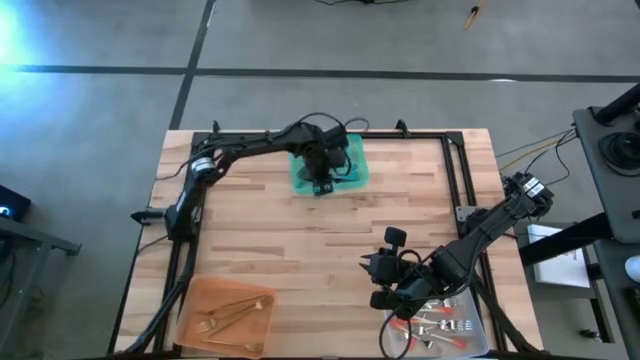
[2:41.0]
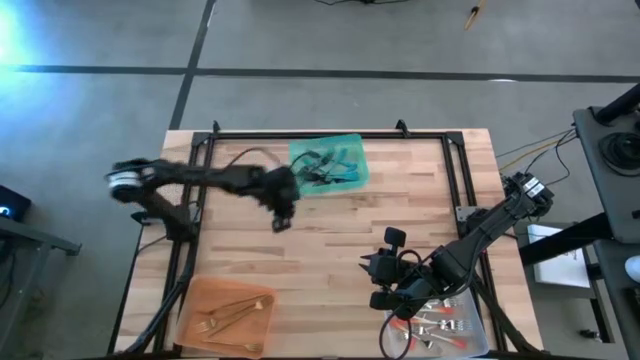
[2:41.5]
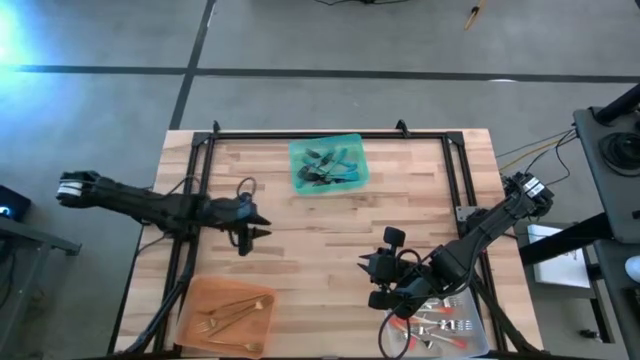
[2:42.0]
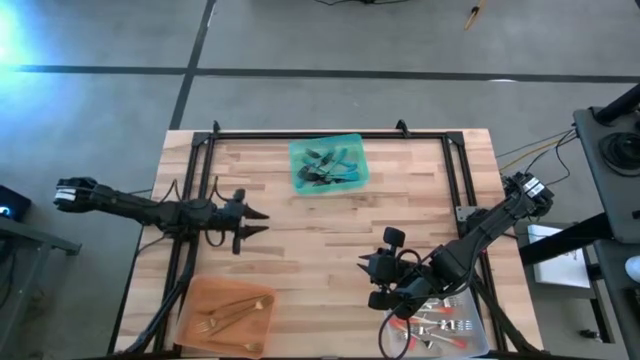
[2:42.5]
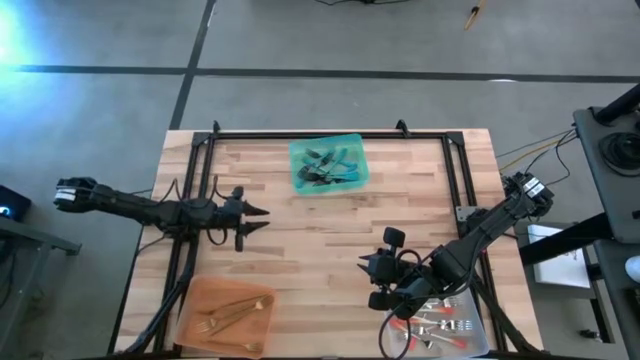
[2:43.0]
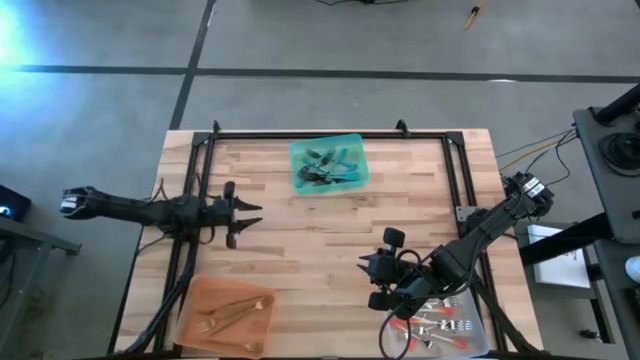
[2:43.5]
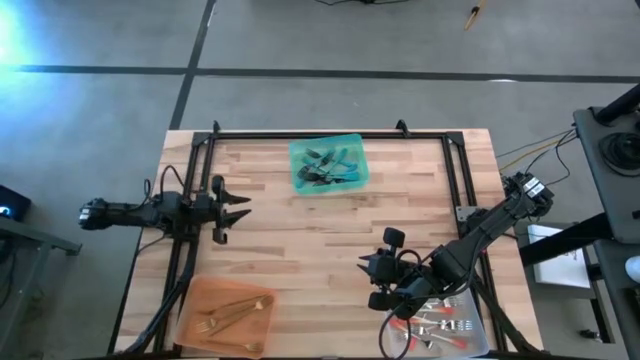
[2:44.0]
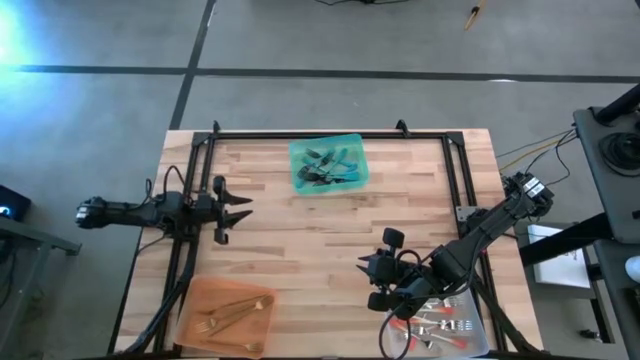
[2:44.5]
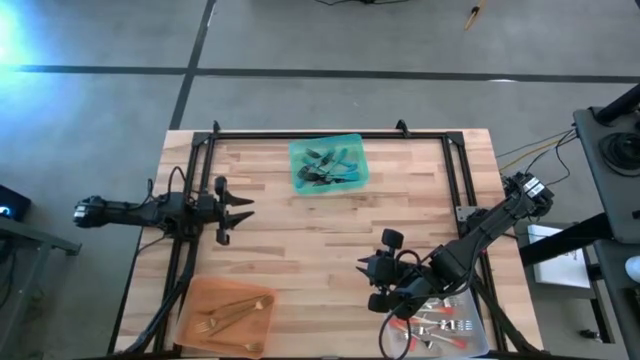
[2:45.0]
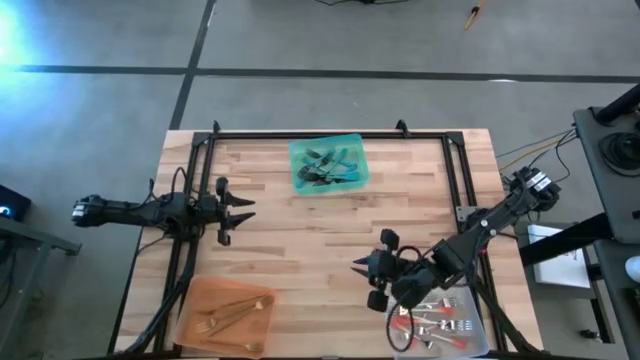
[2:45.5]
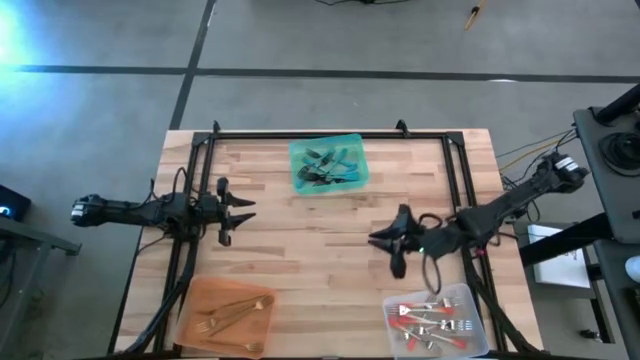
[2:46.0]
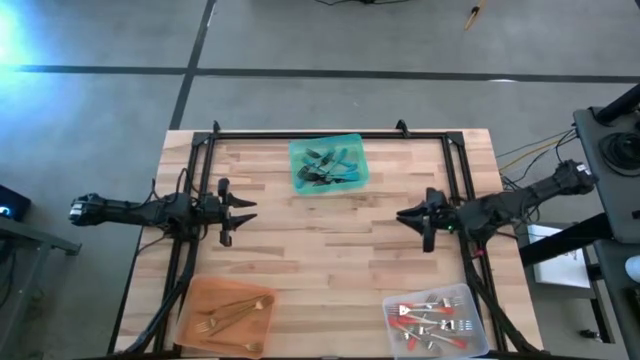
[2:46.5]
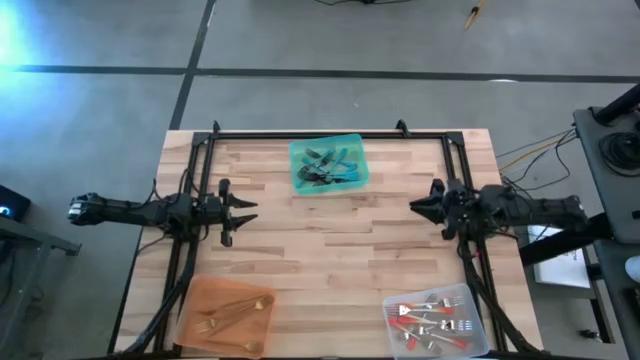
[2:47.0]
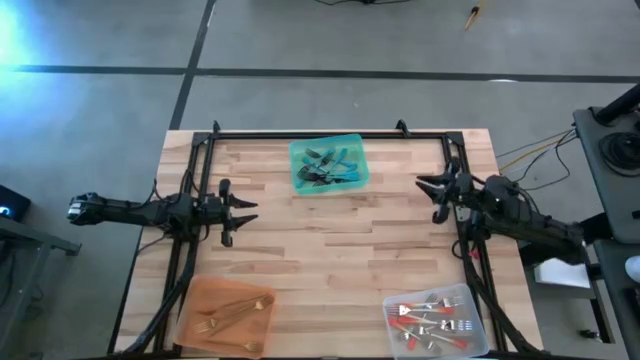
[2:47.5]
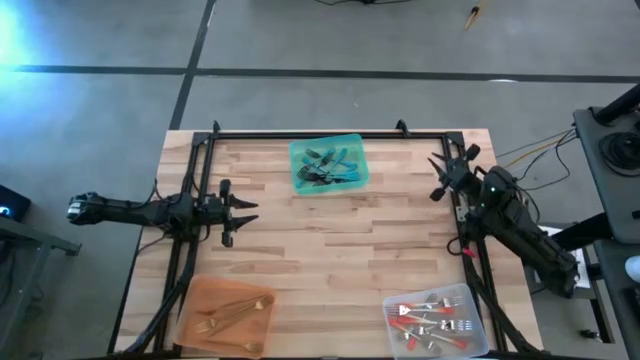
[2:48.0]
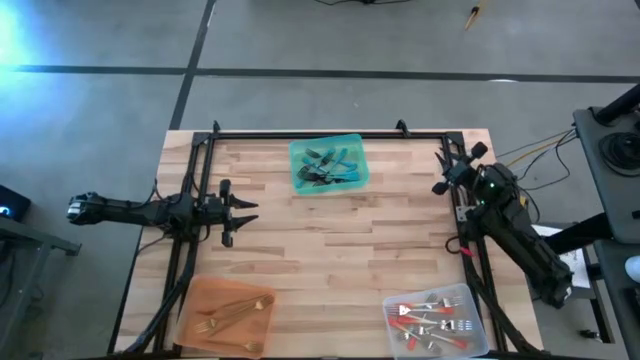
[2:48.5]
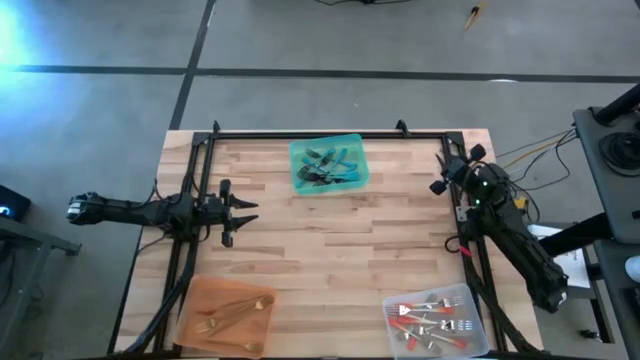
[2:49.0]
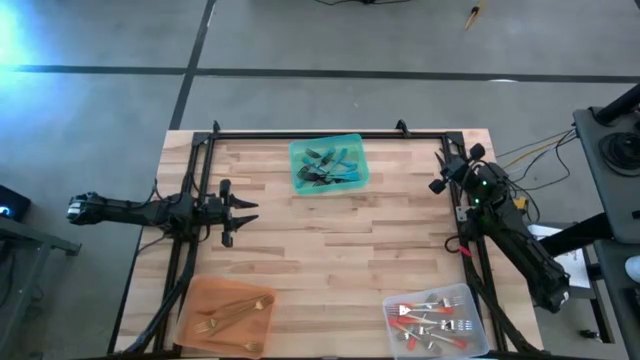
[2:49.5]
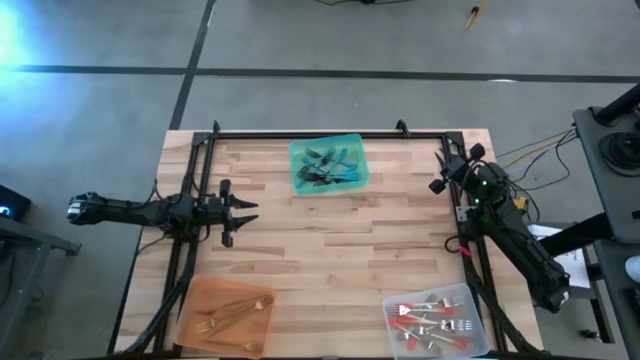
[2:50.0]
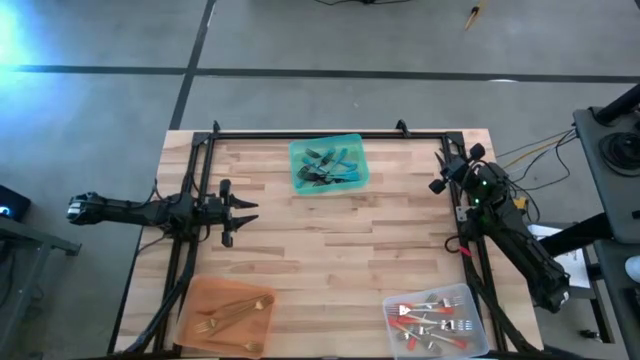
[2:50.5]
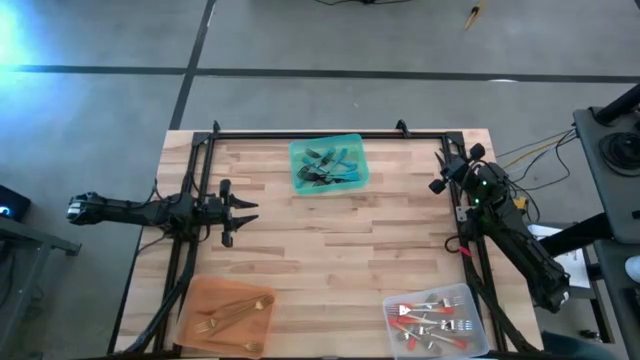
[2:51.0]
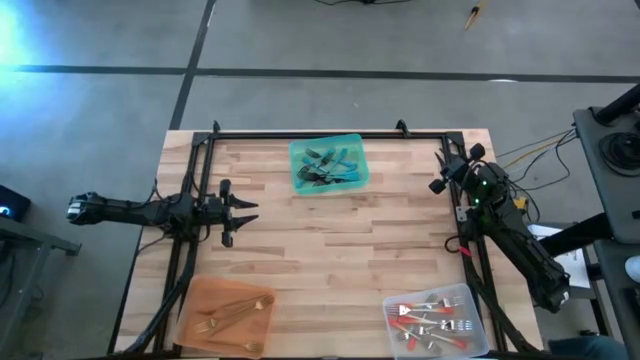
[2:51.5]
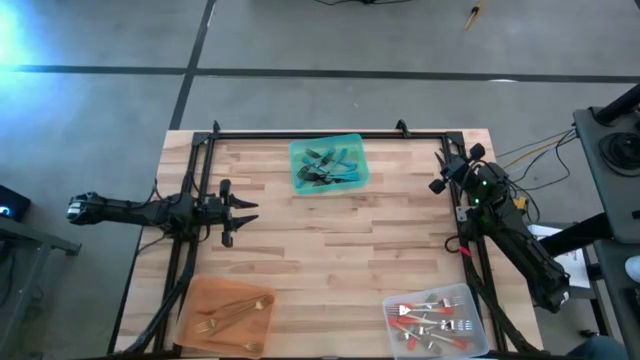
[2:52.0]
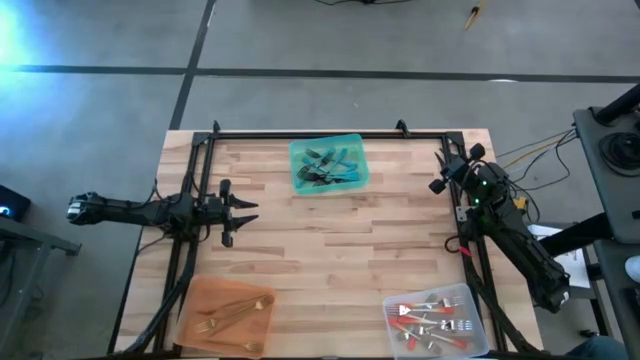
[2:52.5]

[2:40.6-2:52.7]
Task: Sort silverware by color (type)
Return to Home Position

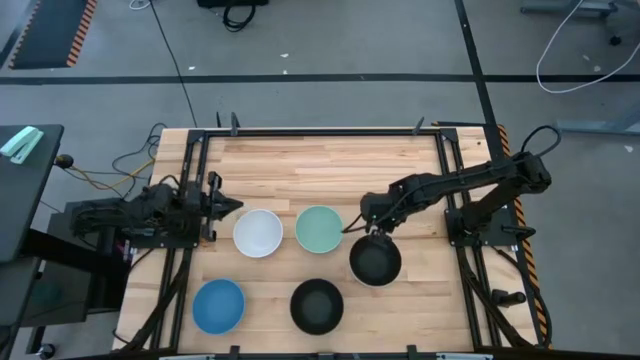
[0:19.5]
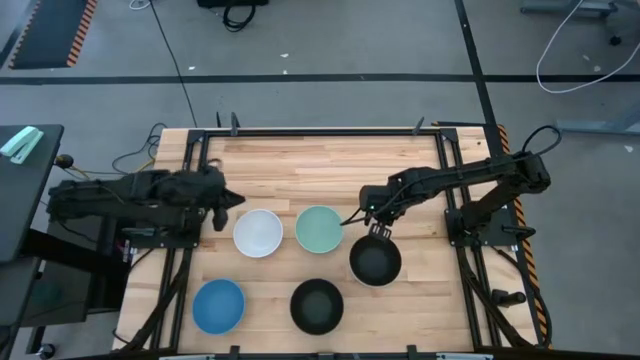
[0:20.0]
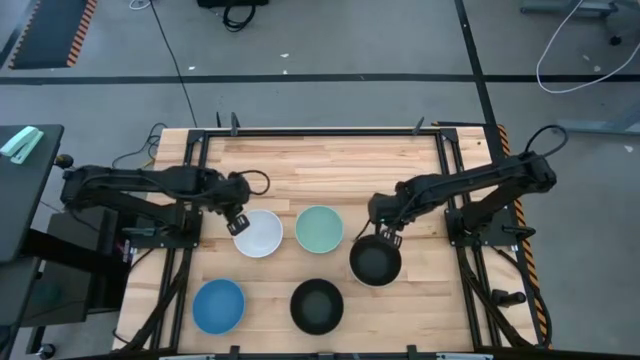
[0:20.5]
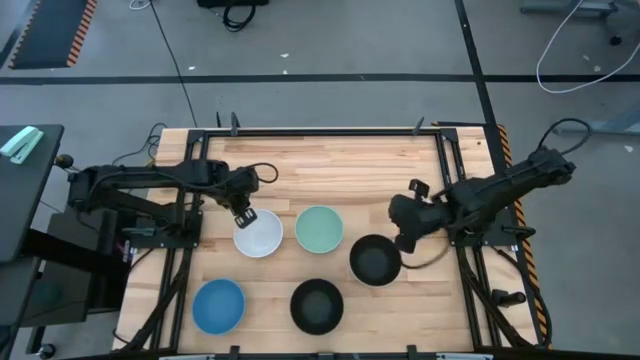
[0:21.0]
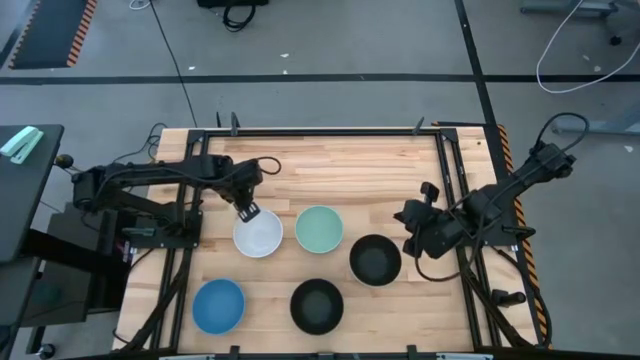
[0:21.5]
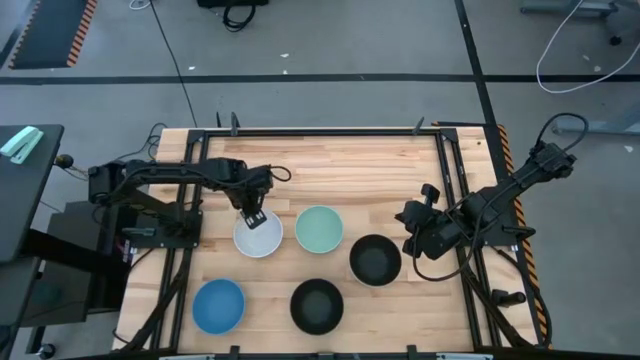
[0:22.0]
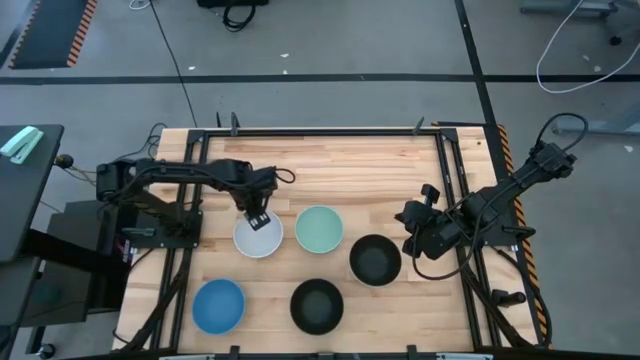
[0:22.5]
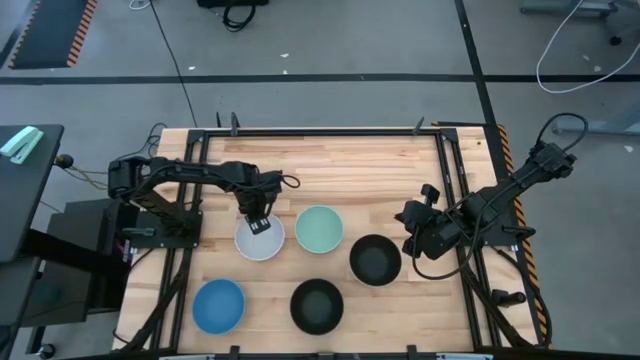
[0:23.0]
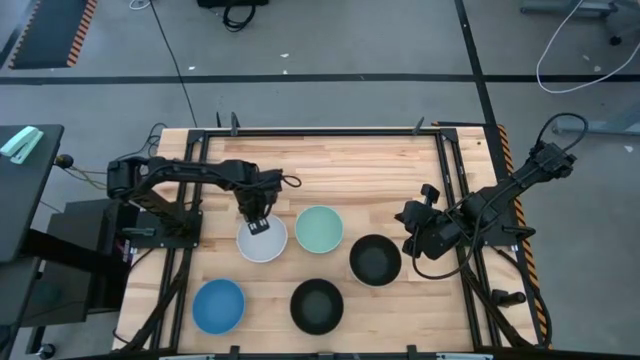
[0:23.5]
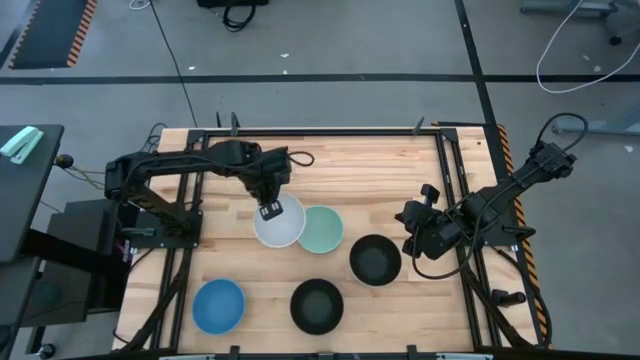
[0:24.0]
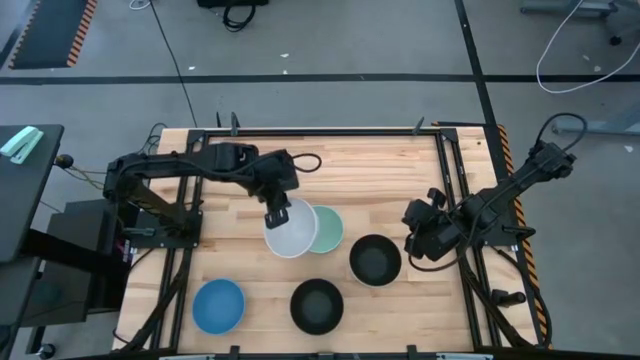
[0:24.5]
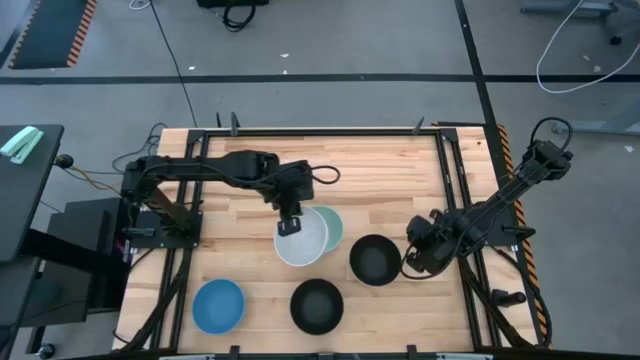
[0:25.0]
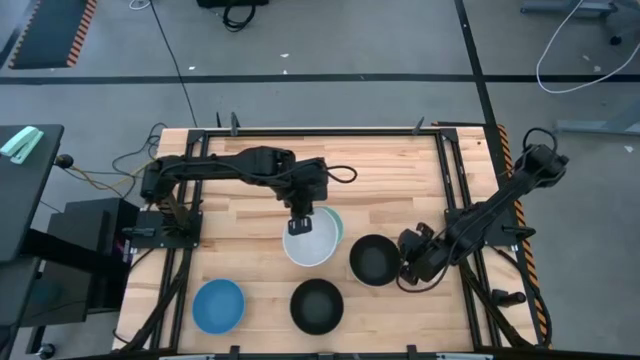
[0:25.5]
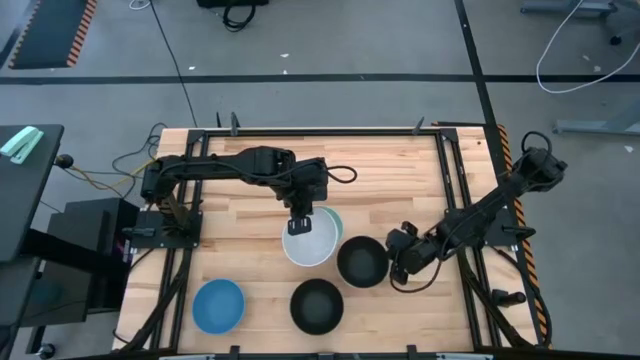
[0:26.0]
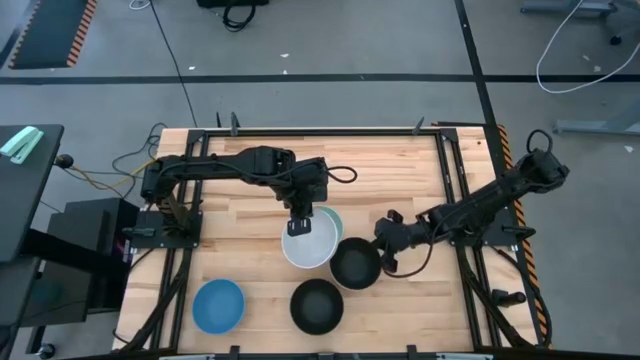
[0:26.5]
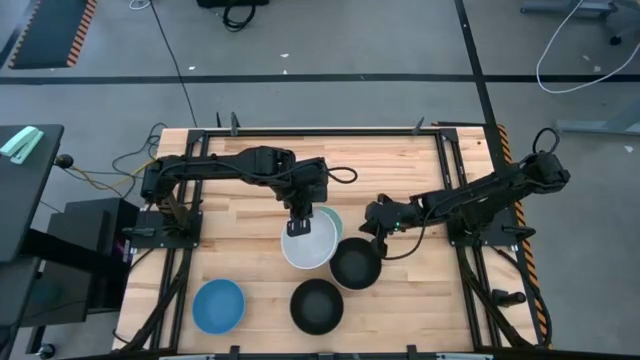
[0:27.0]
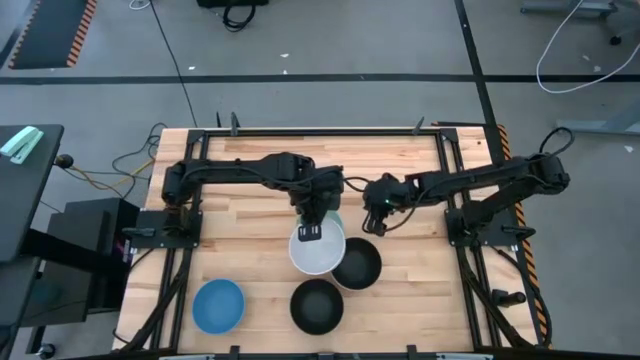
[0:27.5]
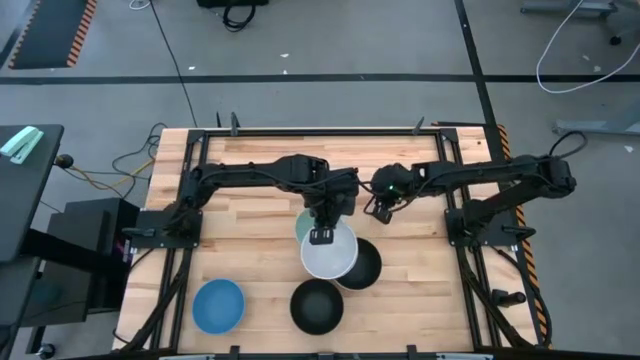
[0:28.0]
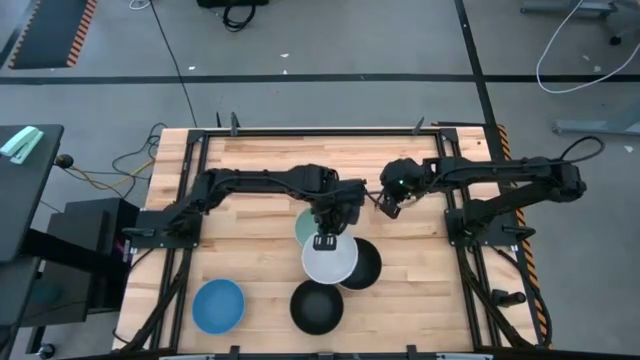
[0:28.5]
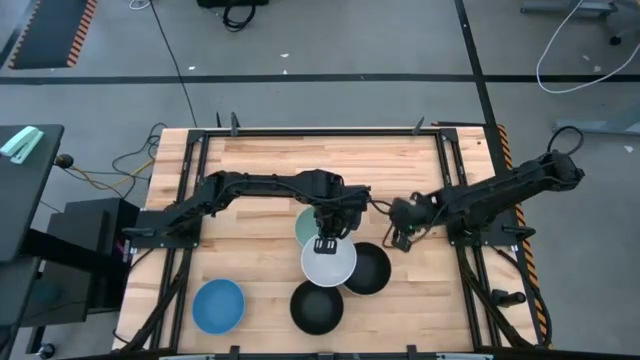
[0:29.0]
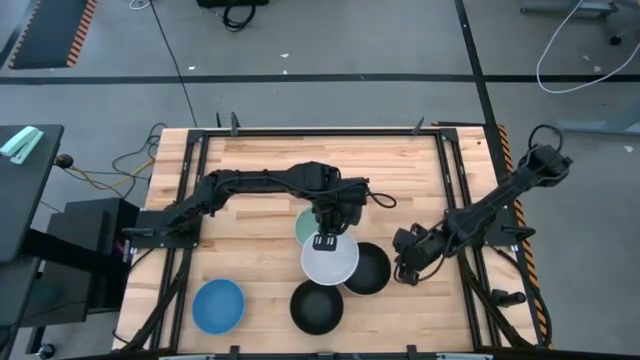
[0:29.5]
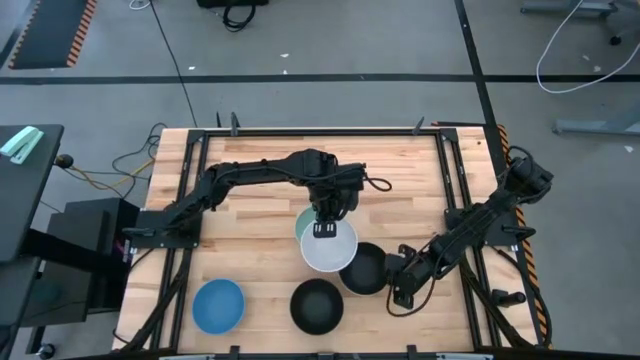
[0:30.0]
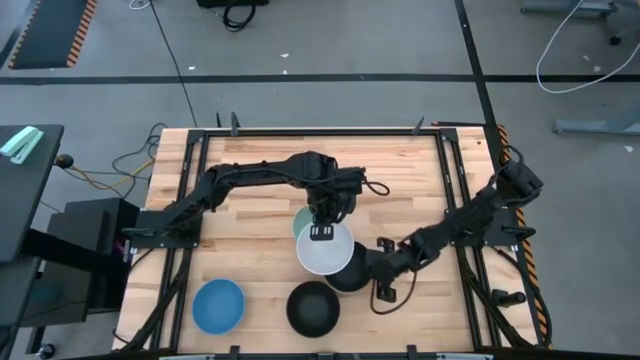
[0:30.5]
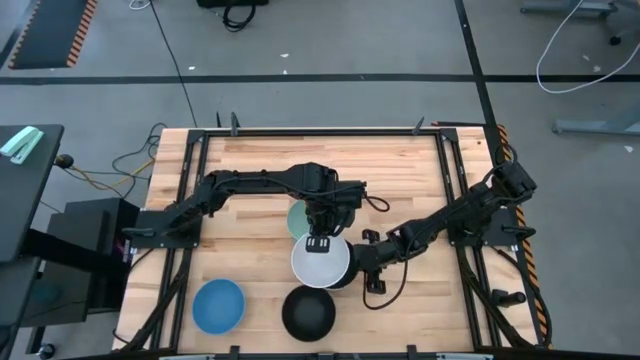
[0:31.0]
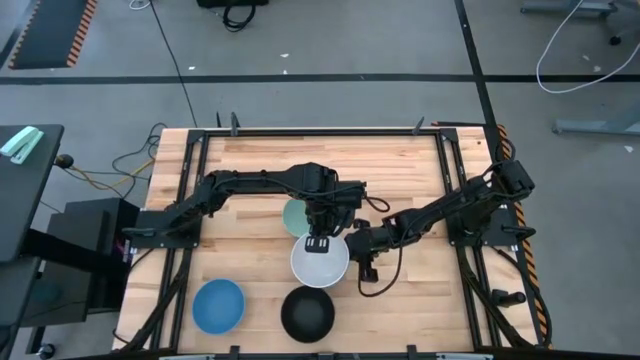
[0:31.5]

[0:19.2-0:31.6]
Task: Nest bowls inside each other
Stack the white bowl on top of the top black bowl
